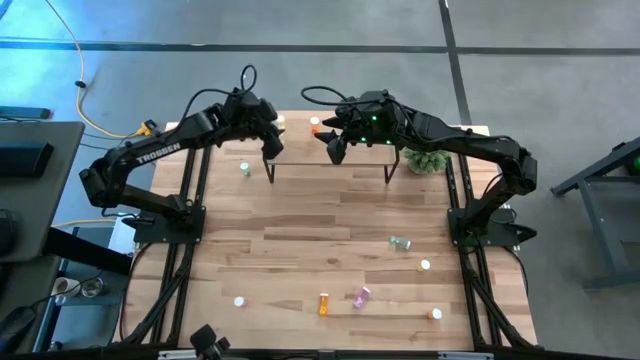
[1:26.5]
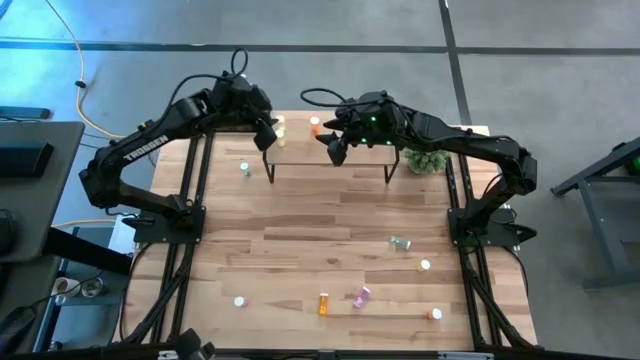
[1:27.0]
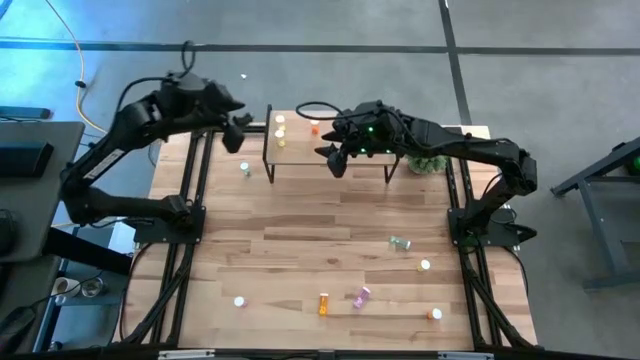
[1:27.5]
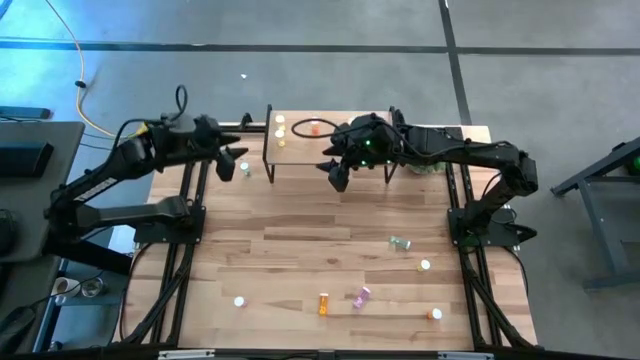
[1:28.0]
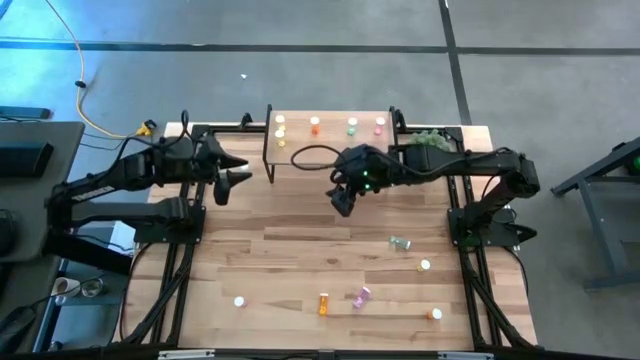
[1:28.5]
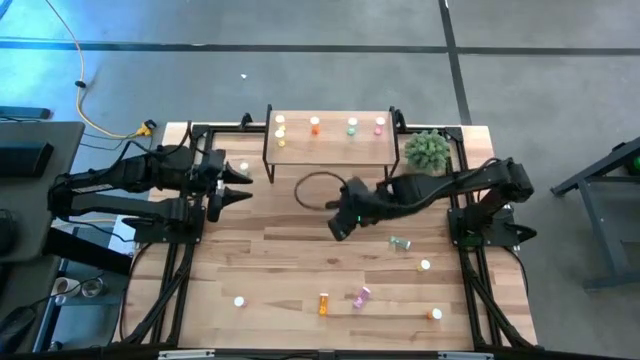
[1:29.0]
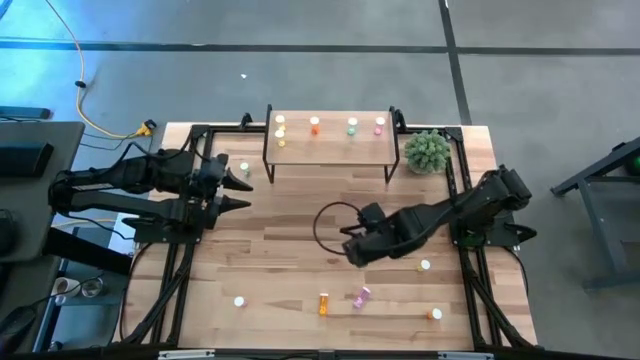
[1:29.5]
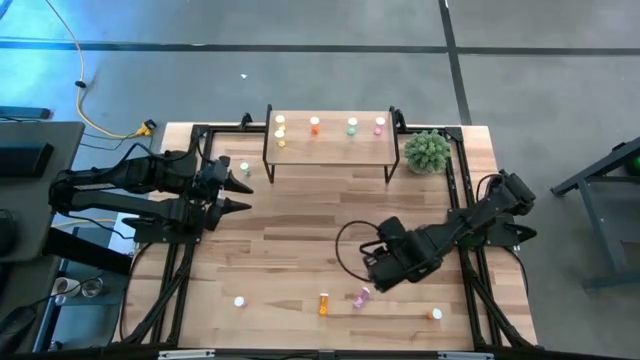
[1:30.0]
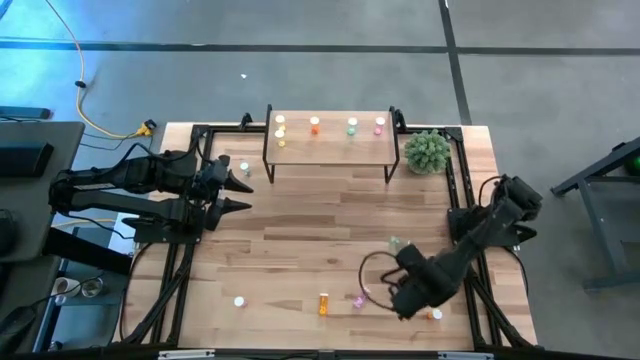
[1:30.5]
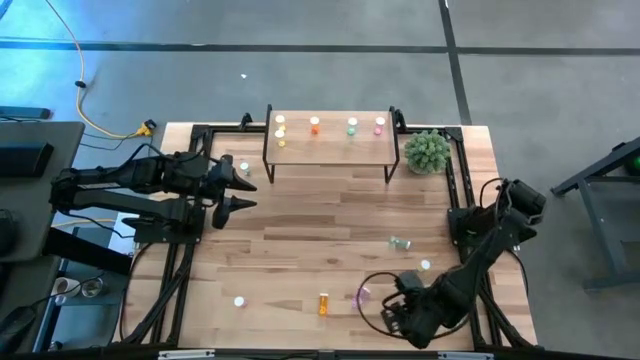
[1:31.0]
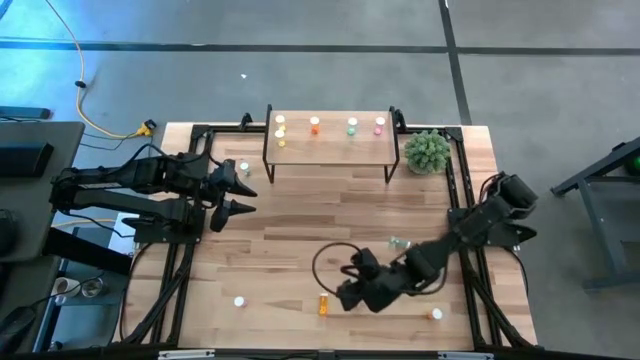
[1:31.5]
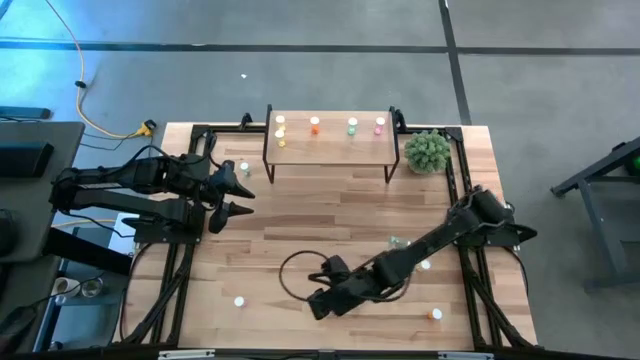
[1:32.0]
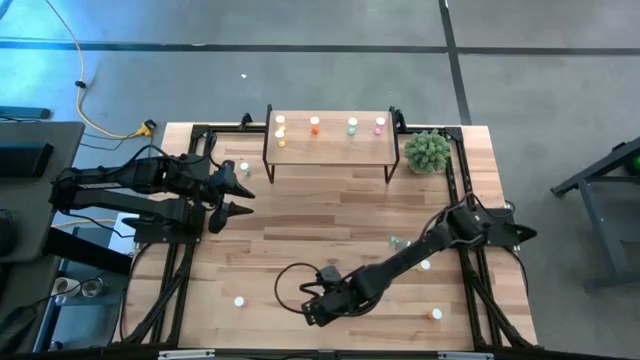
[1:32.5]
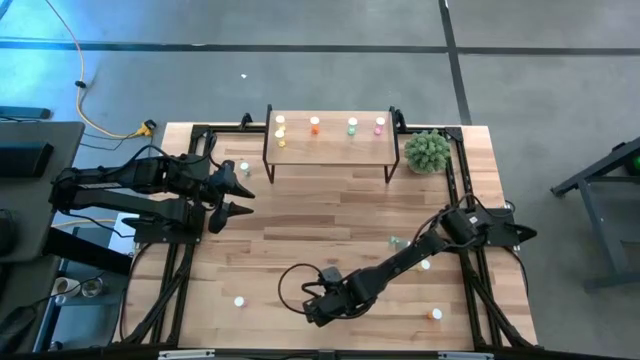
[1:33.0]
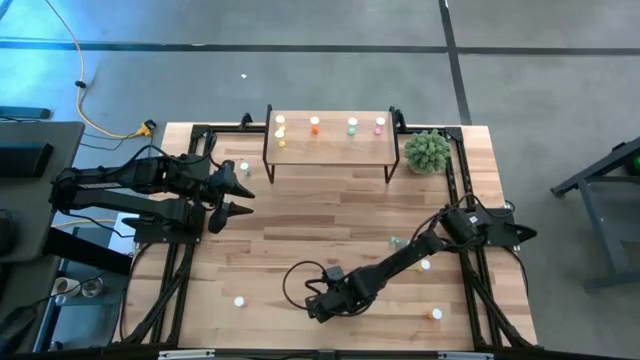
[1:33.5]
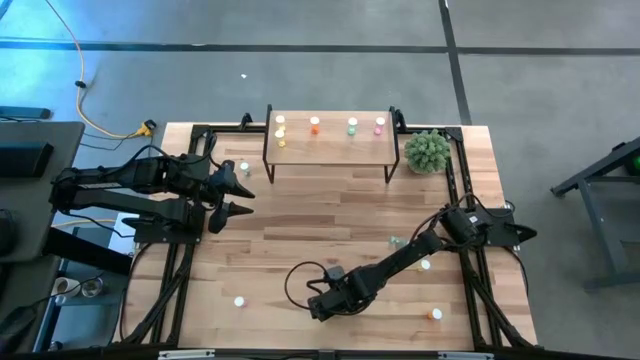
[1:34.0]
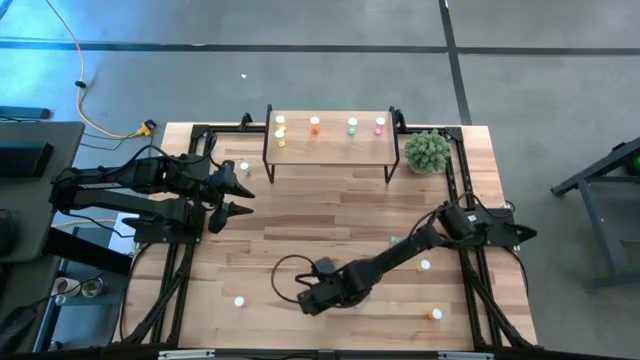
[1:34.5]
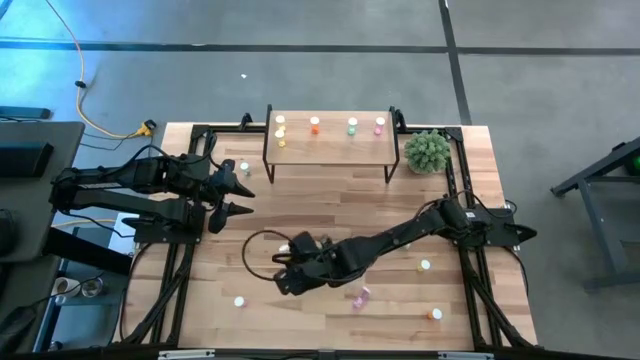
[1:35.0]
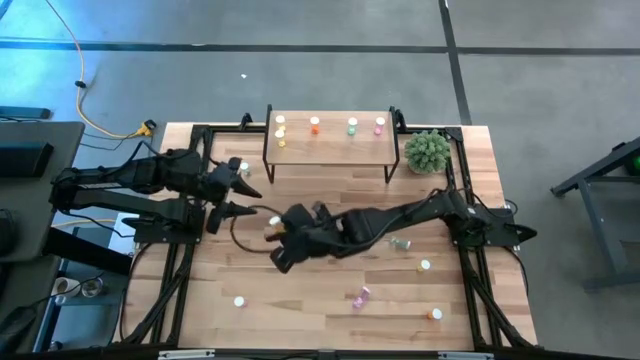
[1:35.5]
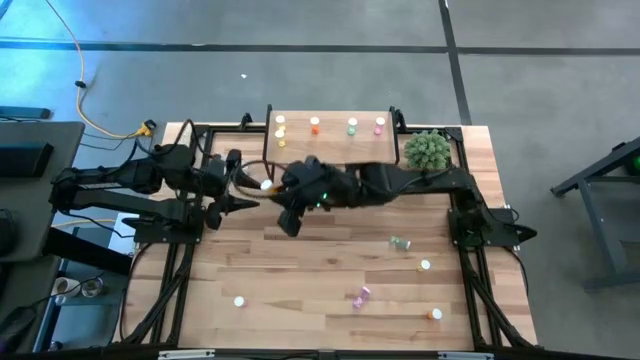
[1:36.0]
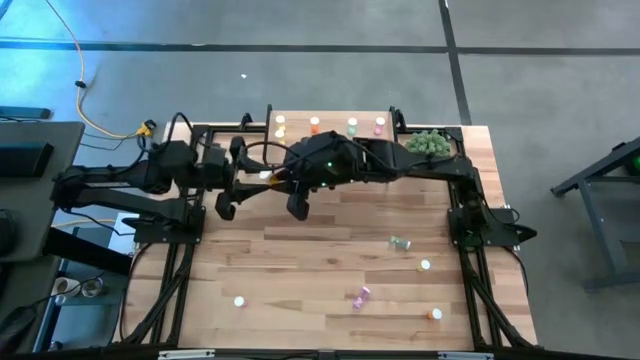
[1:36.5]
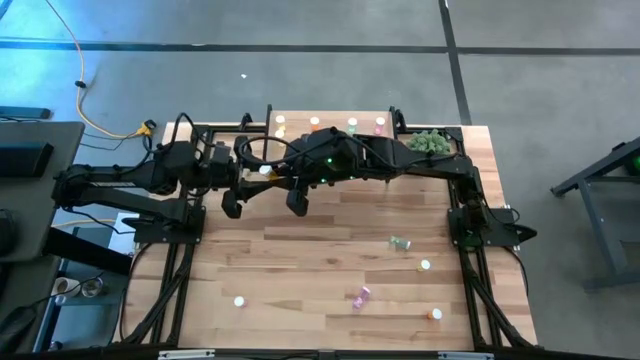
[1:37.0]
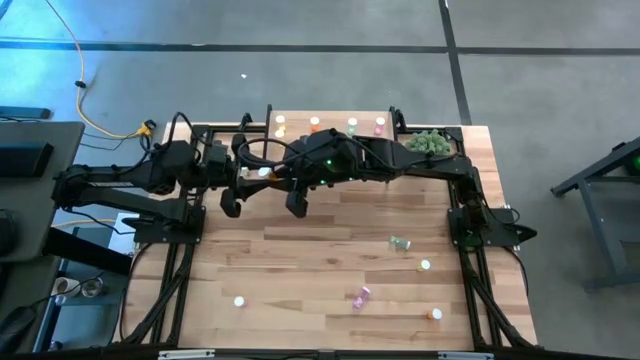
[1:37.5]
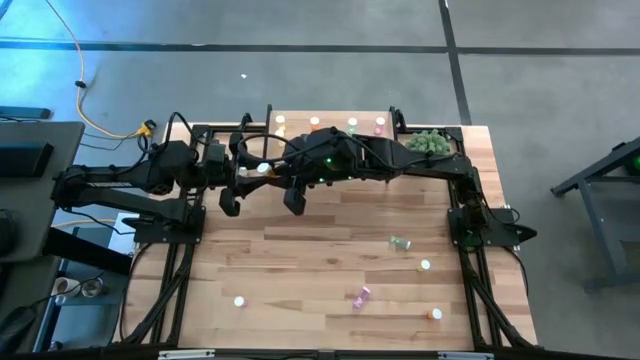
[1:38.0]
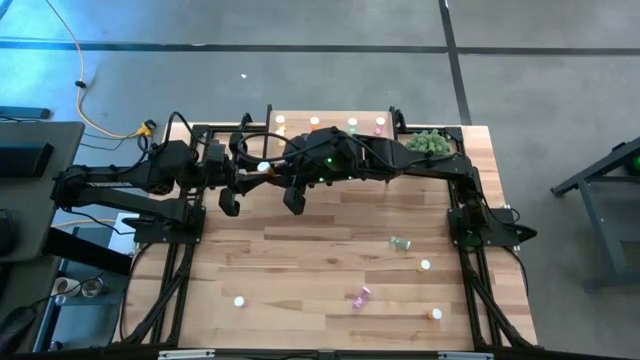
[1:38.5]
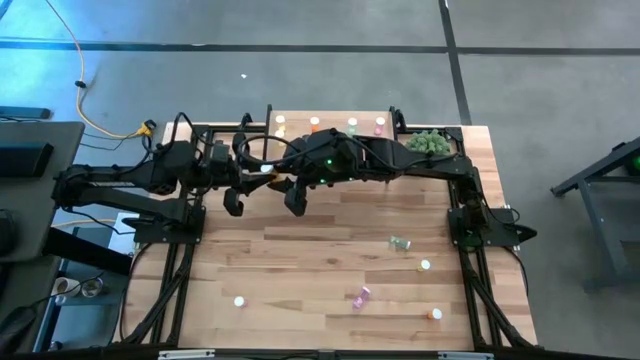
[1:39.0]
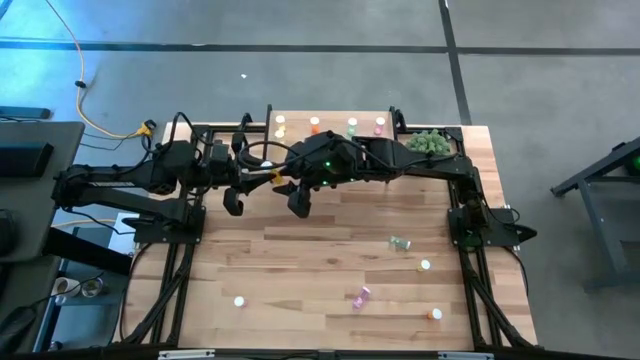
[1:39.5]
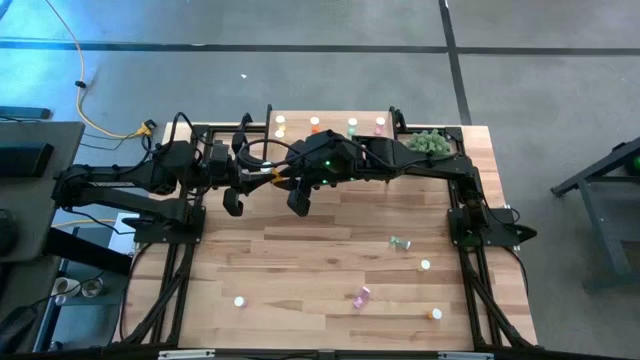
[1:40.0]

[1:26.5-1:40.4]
Task: Pick and place medicine bottles onto shelf by color
Put the left orange pill bottle on the shelf aligned with the other orange pill bottle

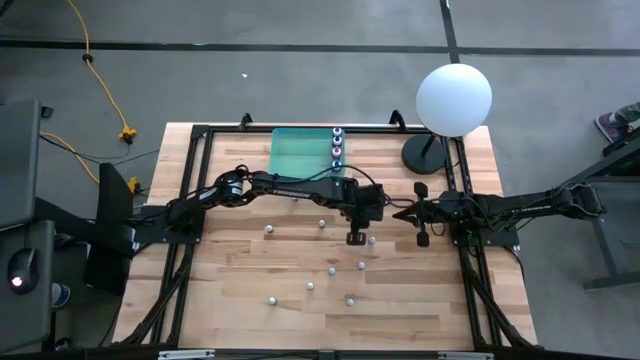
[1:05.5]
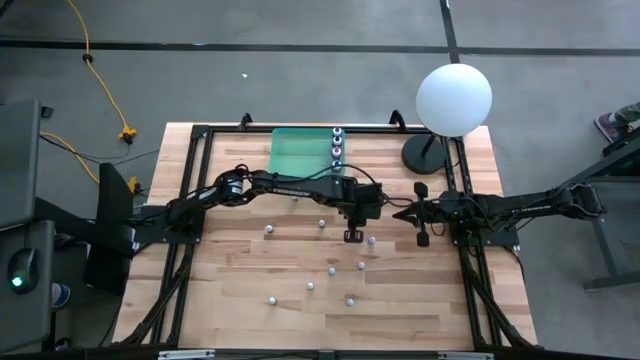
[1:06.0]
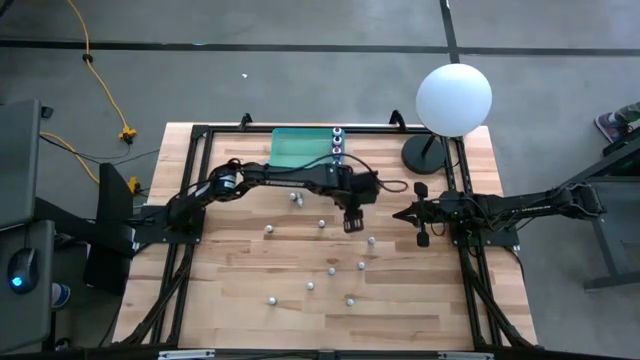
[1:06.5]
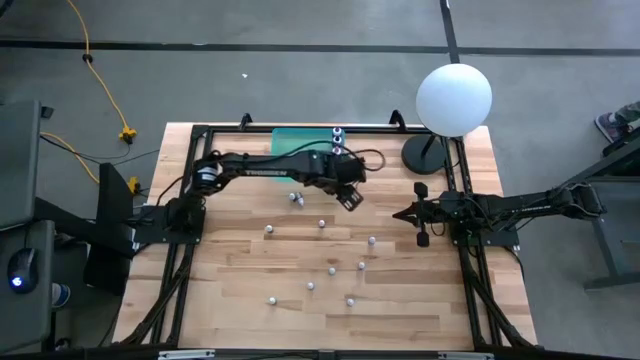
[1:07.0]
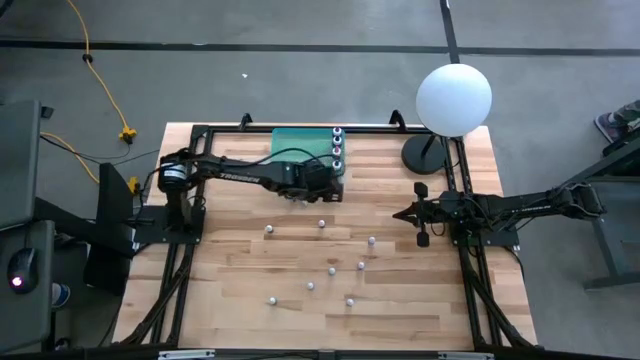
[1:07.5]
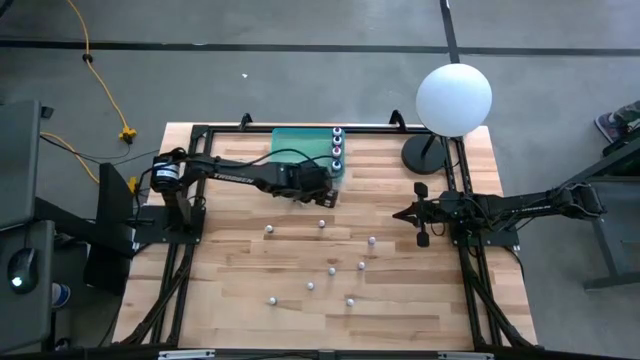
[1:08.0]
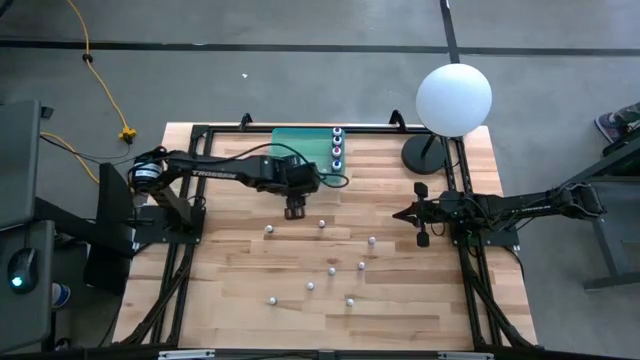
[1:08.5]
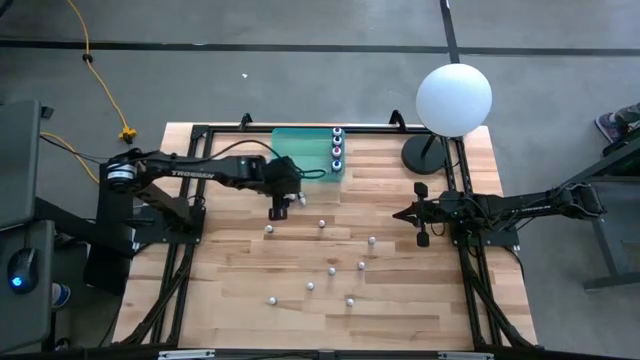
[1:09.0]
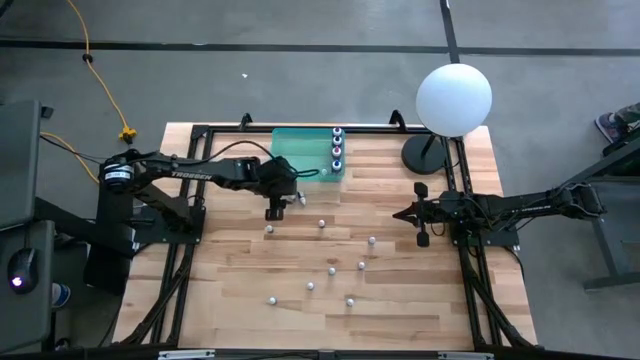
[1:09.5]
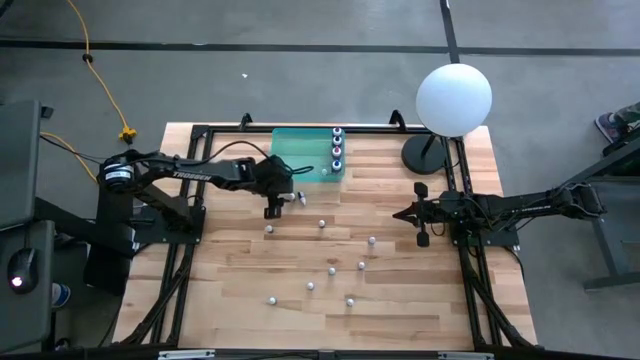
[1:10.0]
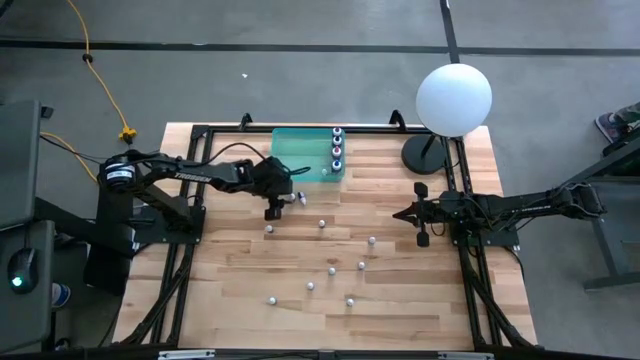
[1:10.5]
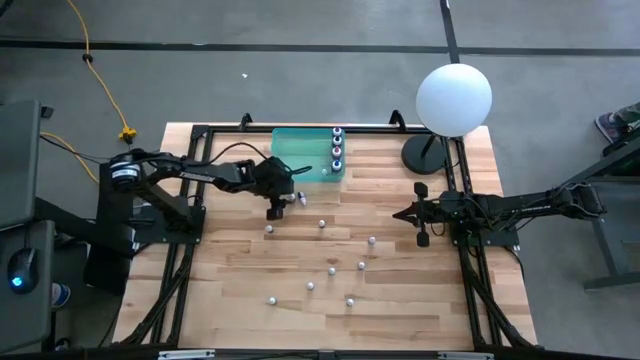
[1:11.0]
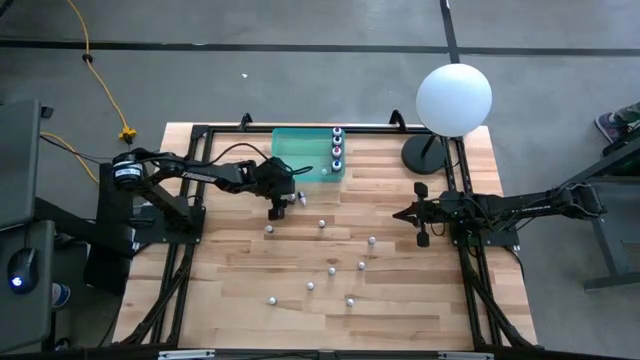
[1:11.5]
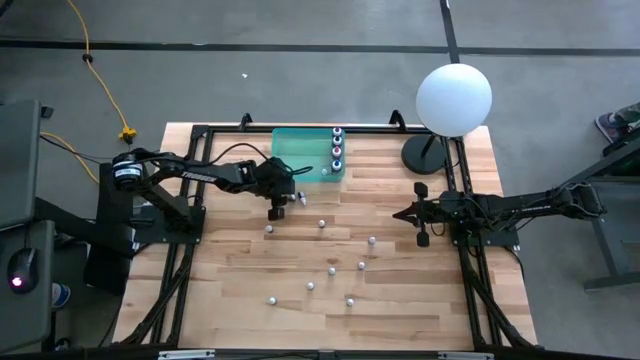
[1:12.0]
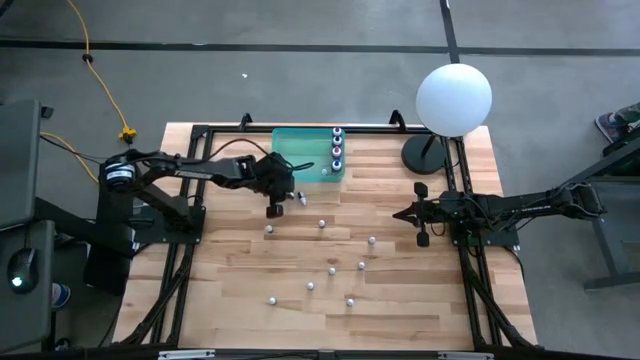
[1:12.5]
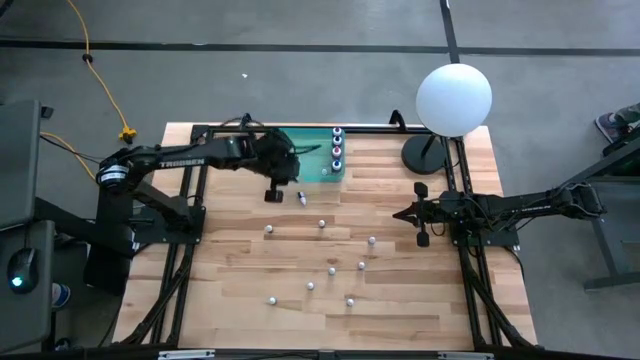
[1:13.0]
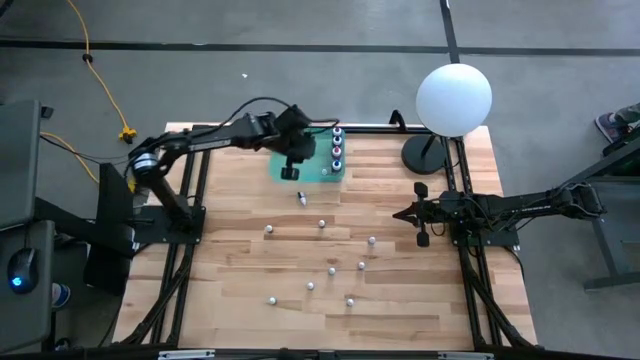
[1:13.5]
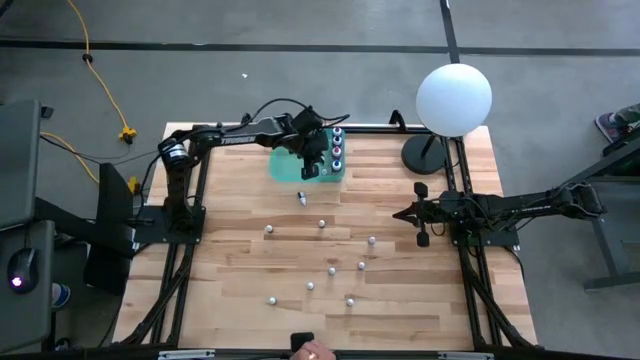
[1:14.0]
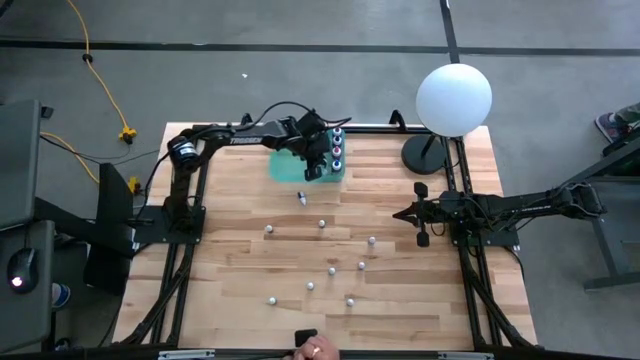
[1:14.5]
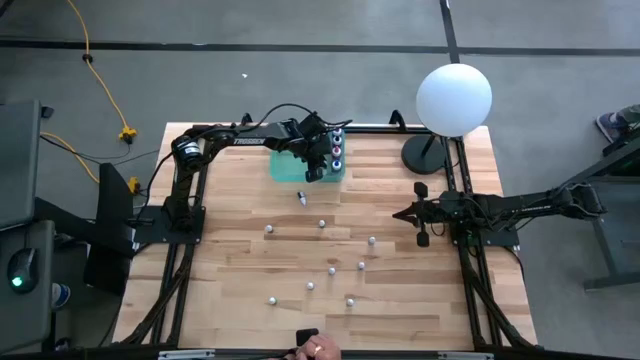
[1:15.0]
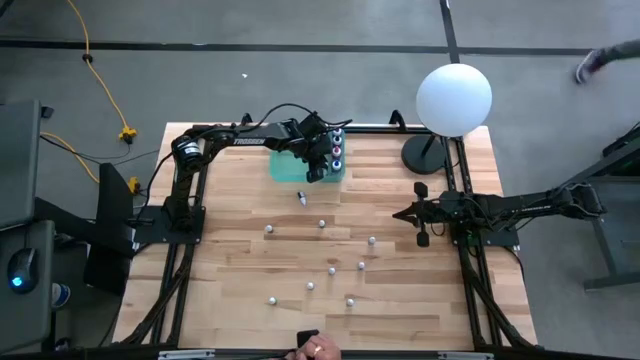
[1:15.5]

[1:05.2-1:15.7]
Task: Pick & Place food coloring
Put the small green food coloring bottle into the blue transparent bin
